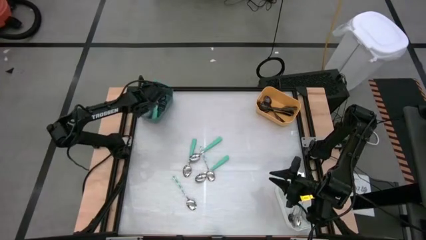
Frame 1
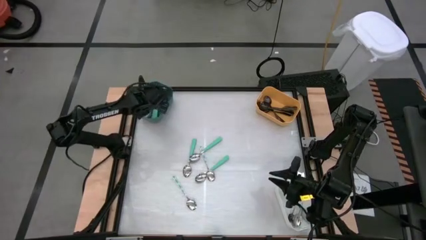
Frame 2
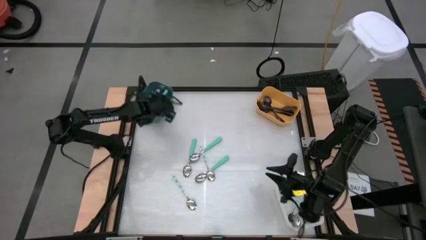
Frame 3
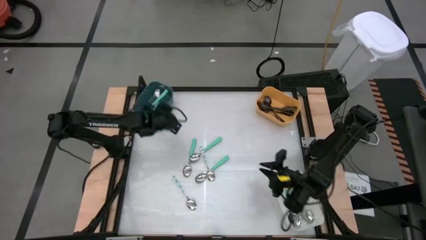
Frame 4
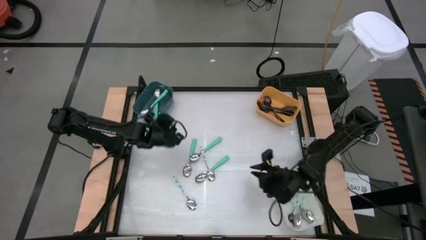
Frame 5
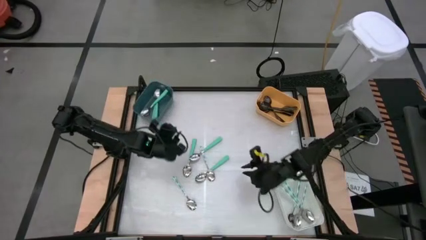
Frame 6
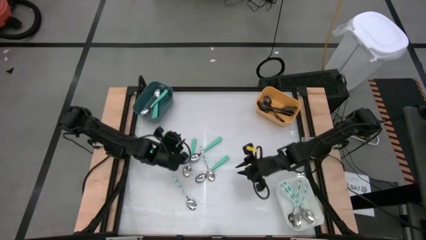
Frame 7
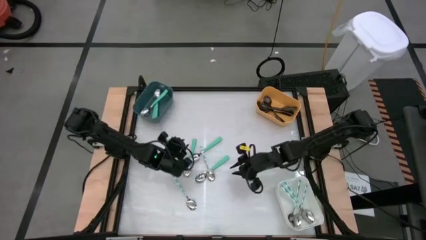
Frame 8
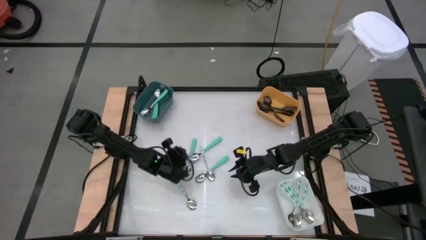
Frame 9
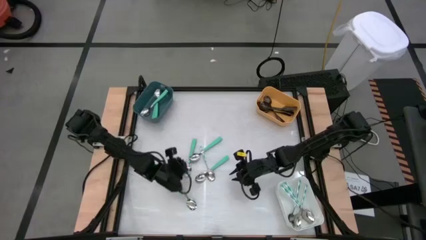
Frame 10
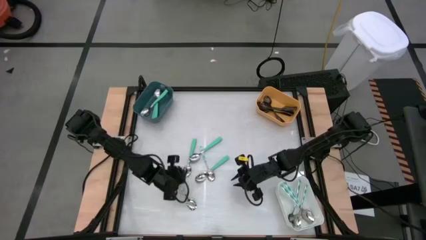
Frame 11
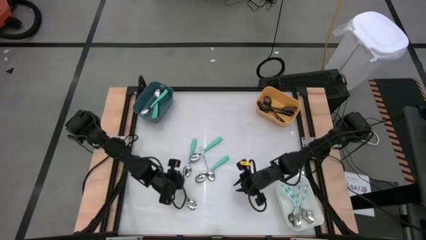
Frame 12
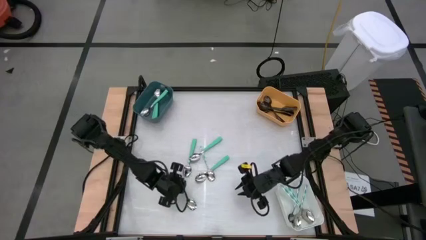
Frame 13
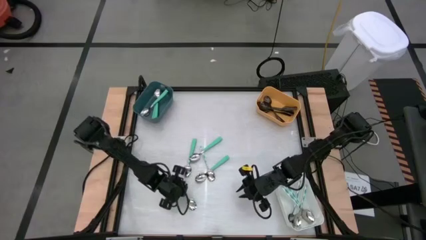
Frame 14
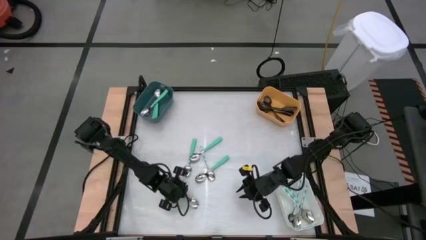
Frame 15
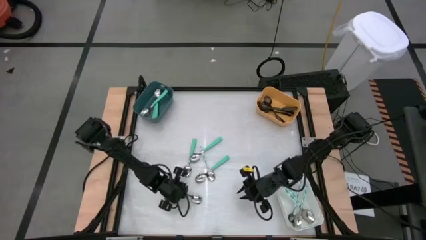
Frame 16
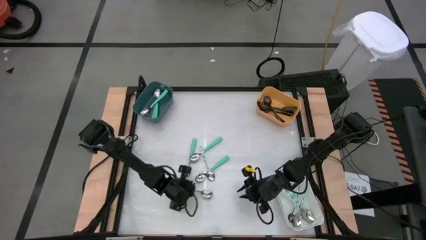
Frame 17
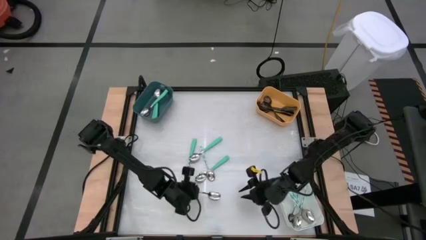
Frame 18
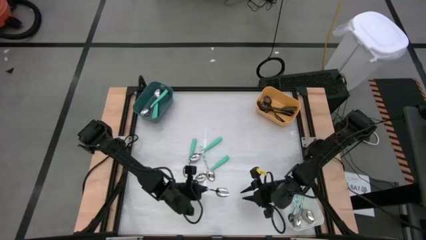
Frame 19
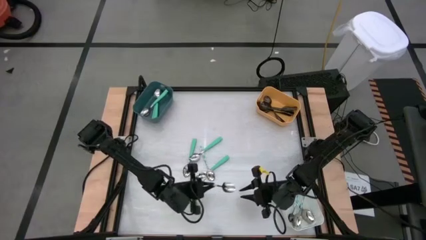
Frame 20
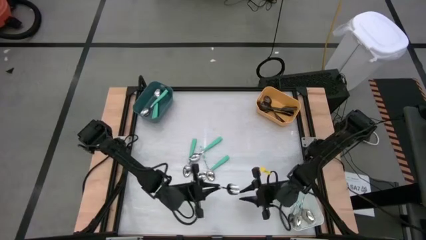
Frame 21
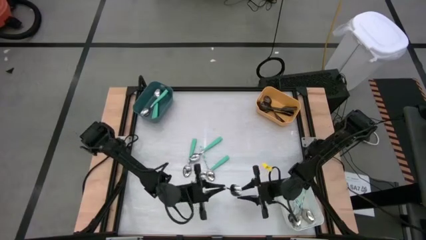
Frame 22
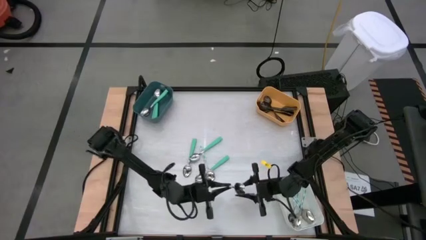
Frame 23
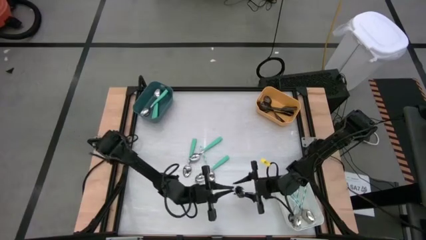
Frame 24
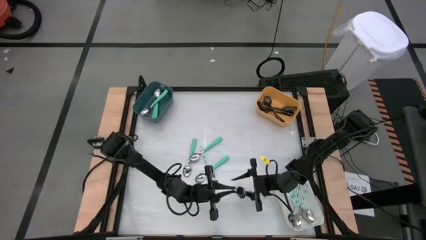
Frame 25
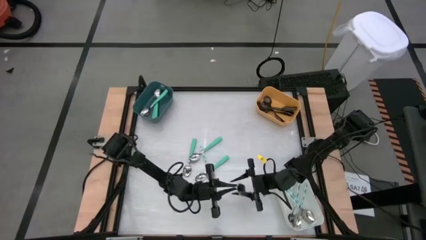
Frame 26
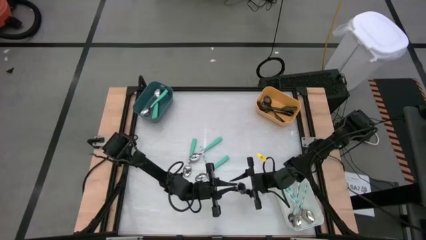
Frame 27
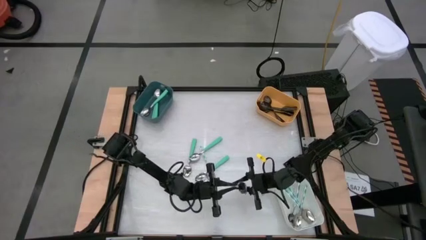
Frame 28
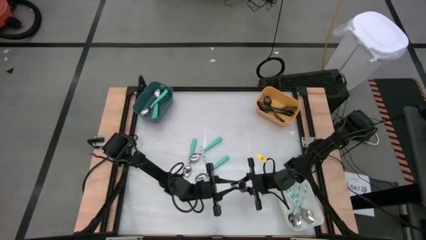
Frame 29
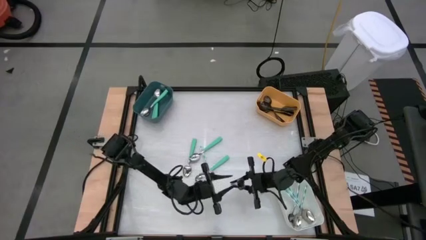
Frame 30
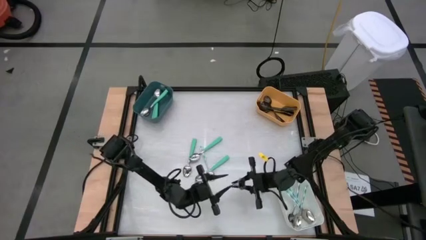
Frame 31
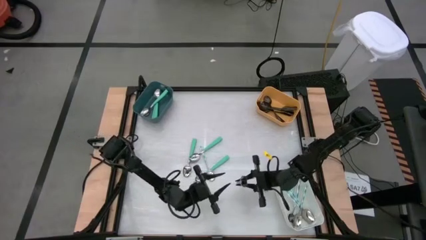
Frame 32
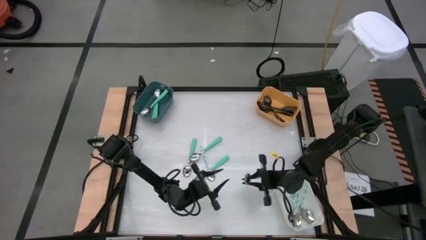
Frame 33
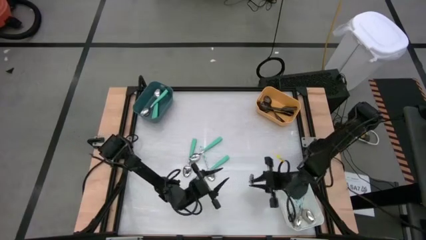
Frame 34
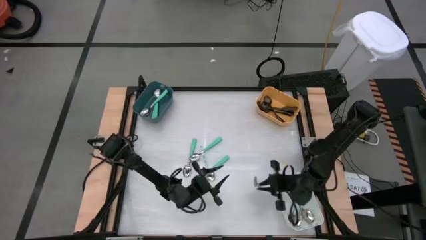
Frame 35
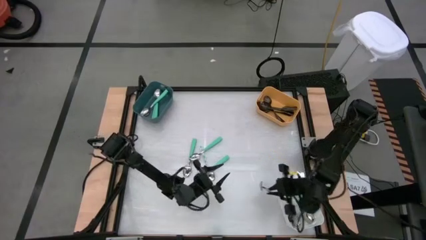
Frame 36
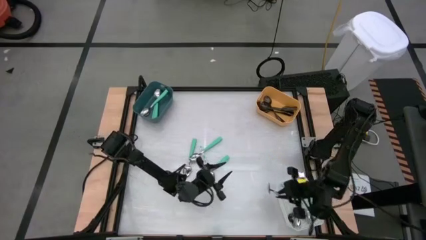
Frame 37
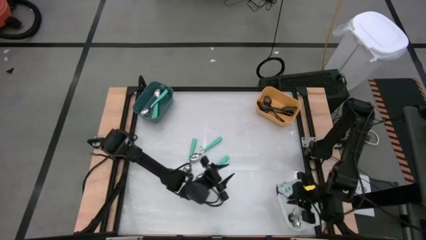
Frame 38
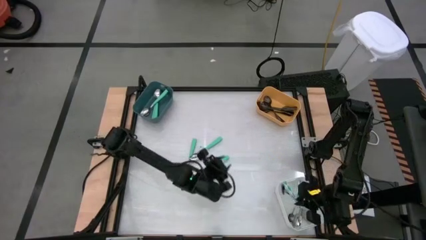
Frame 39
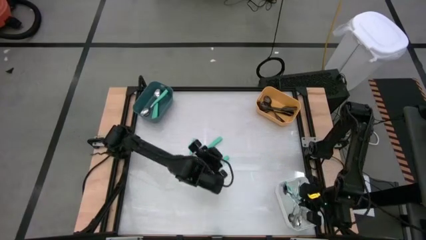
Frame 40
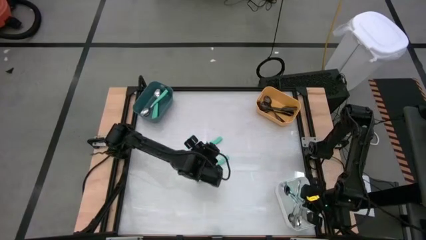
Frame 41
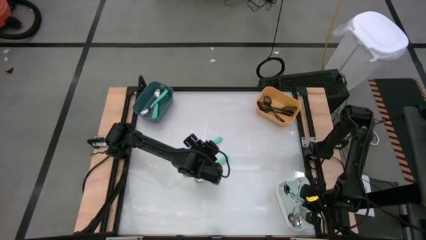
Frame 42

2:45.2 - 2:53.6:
Task: Sort silverware by color (type)
Put the patterned green spoon into the white bin

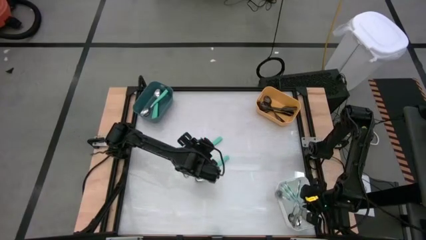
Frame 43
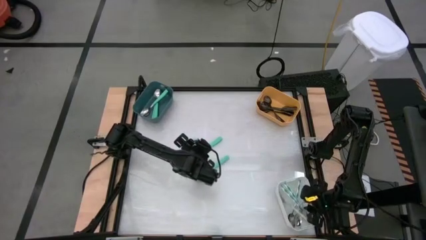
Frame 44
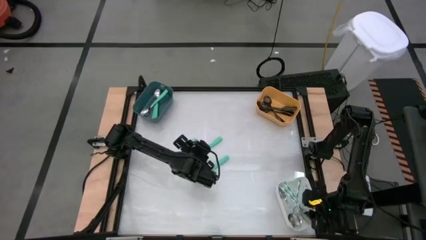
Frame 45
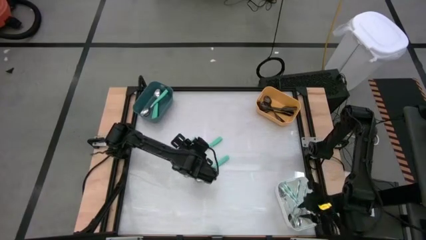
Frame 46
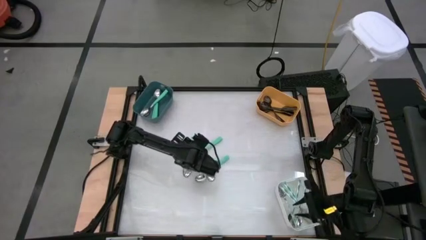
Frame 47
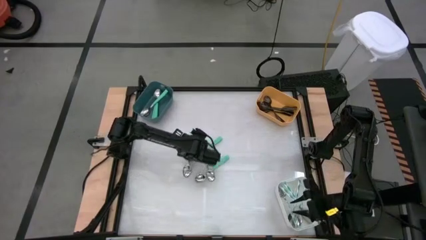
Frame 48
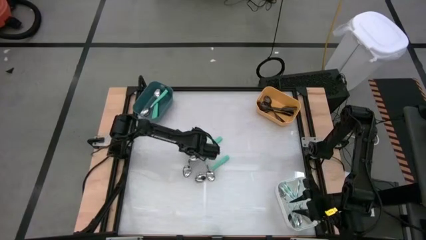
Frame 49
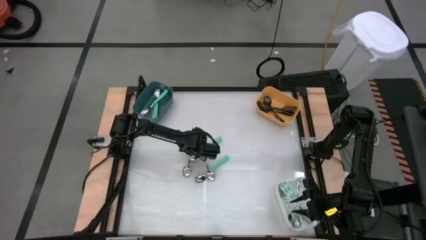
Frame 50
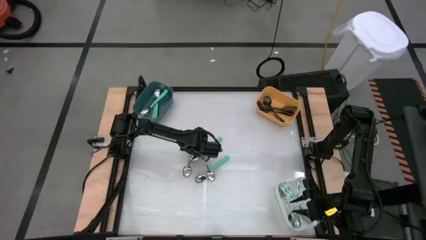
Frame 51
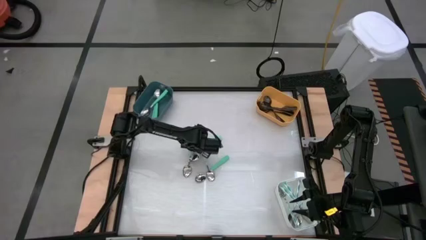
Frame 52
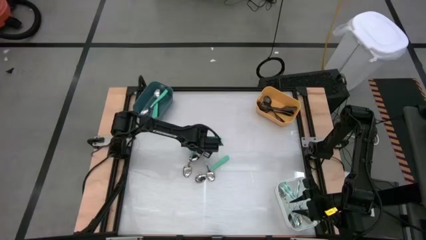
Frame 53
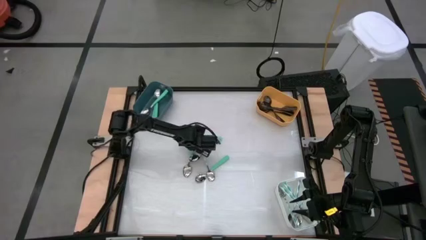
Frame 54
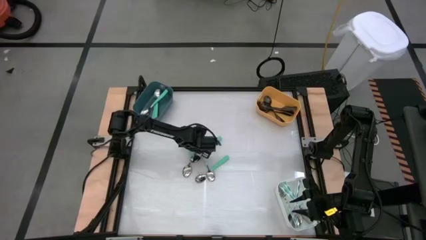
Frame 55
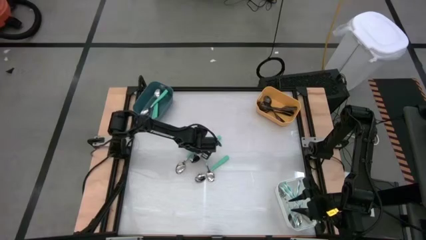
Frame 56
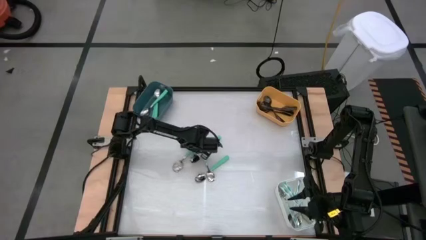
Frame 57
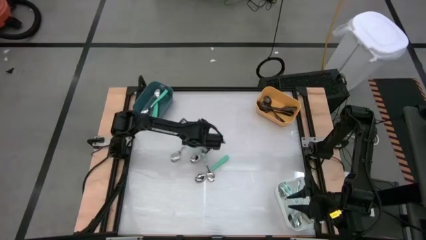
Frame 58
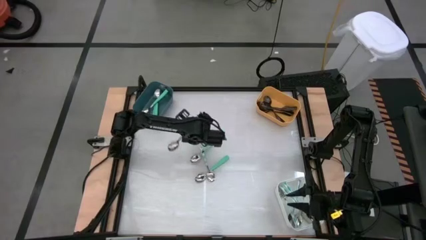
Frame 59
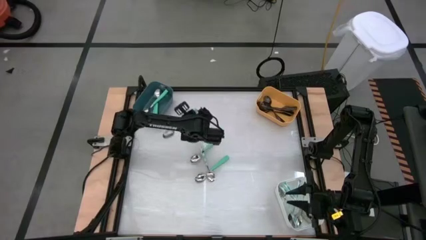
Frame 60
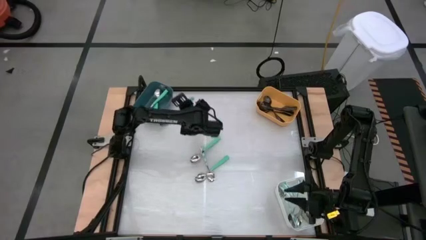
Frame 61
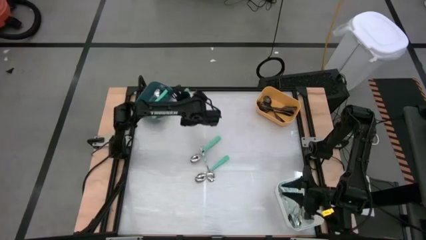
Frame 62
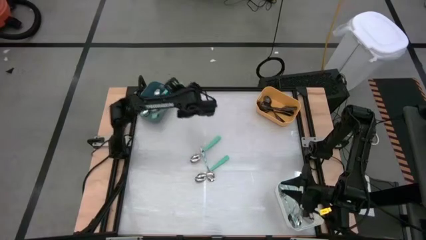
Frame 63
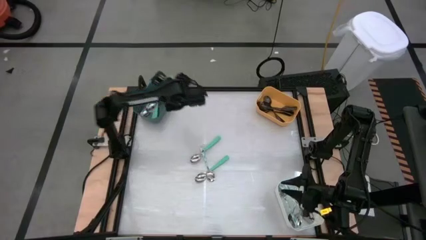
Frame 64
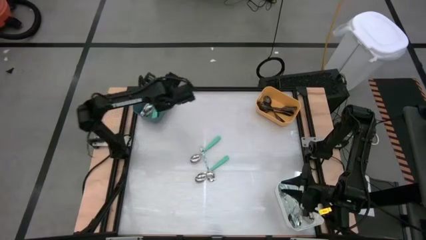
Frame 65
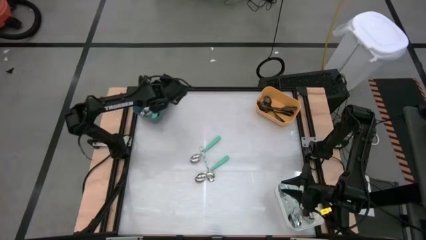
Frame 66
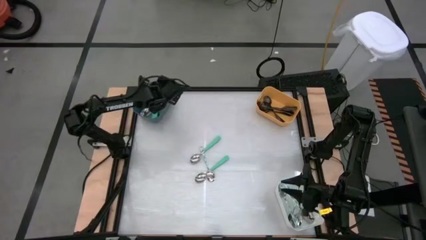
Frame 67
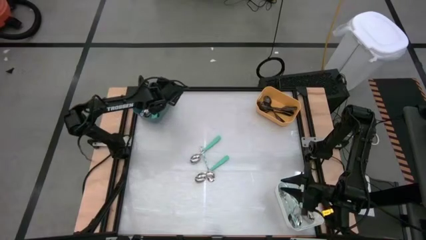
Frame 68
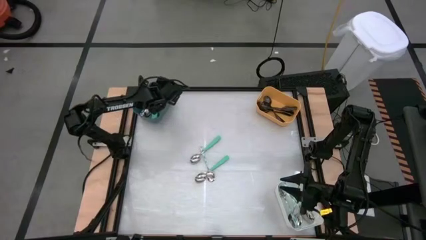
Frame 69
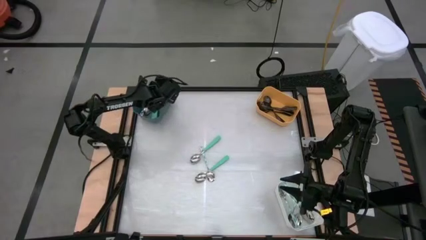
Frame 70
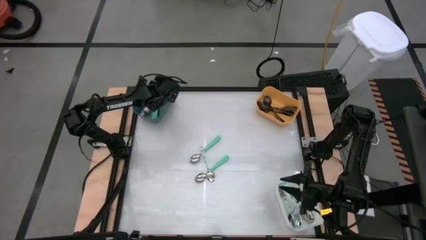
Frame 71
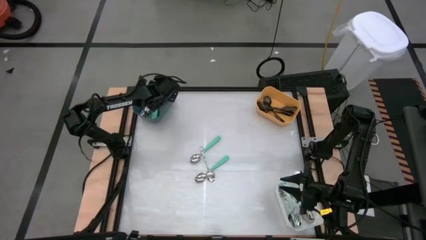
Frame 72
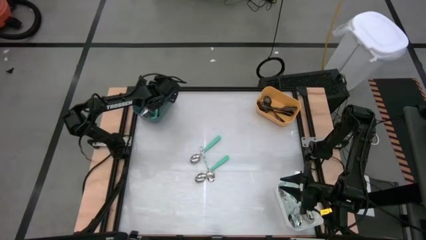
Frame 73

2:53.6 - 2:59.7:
Put the green spoon into the blue bin

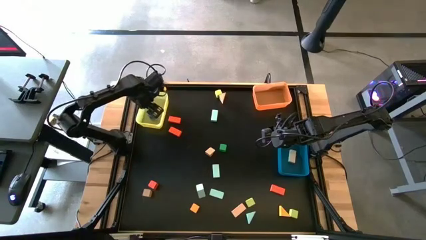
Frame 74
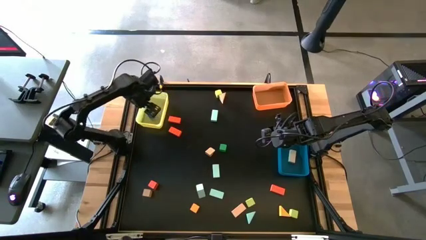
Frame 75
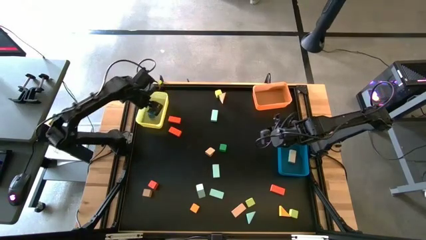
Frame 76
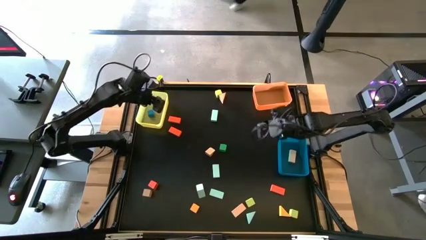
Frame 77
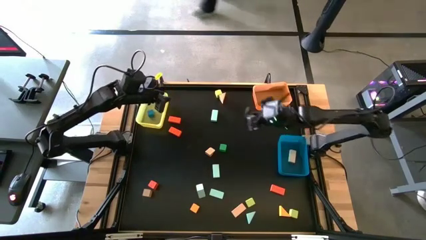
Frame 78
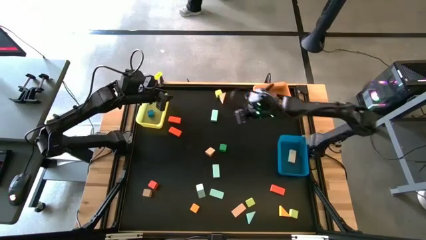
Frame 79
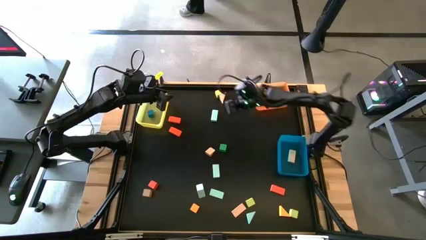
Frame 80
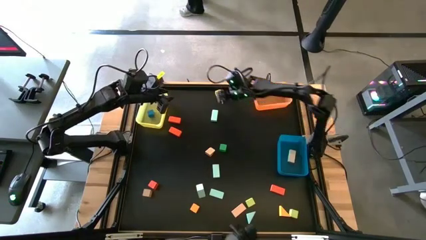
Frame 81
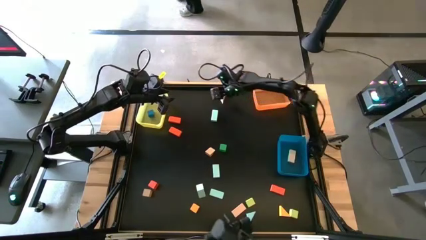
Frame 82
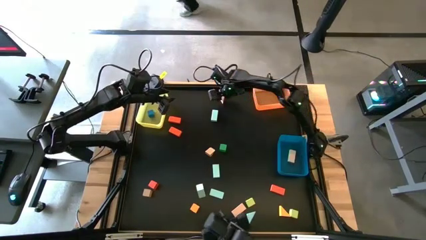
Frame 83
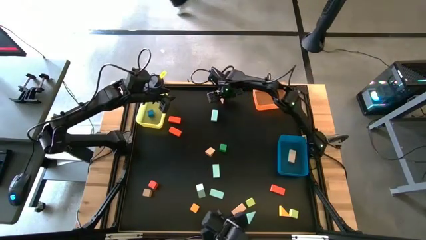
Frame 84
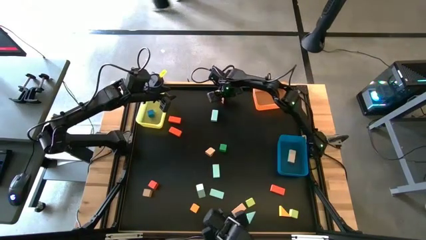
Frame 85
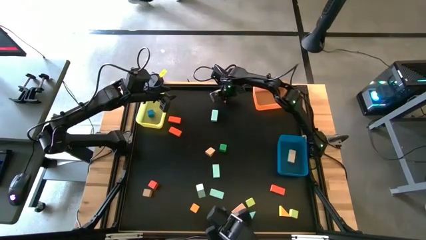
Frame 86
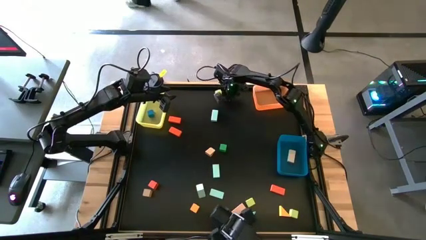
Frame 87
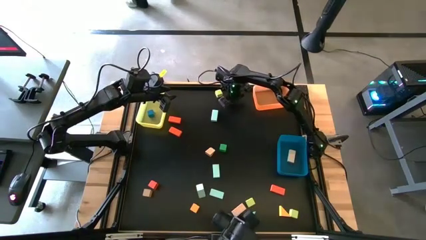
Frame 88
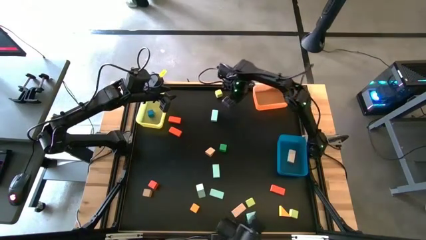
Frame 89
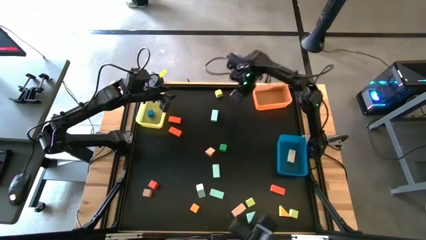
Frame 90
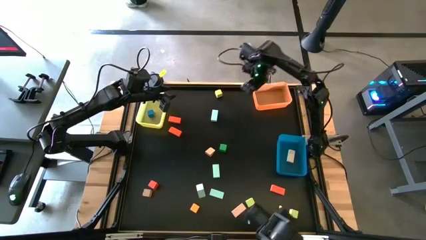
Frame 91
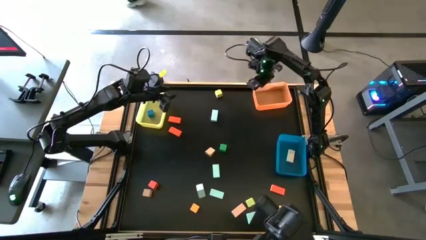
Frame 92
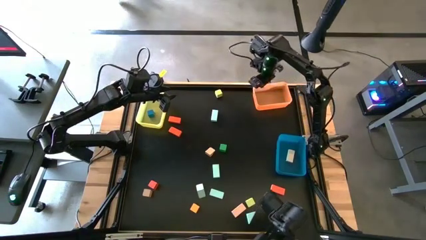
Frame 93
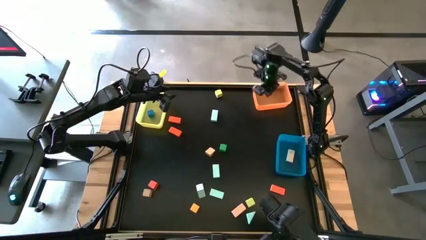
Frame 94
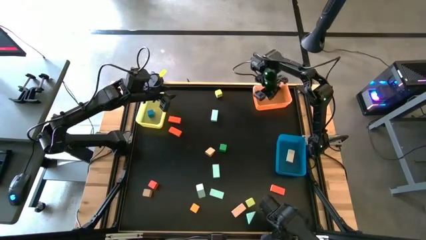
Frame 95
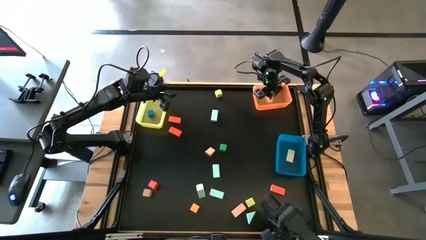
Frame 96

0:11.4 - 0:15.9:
Task: Sort blocks by size
Put the pink triangle block into the orange bin
